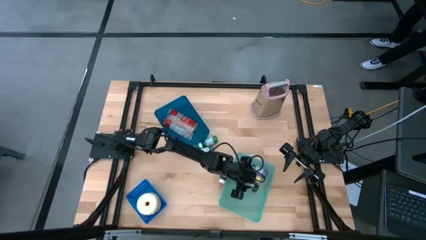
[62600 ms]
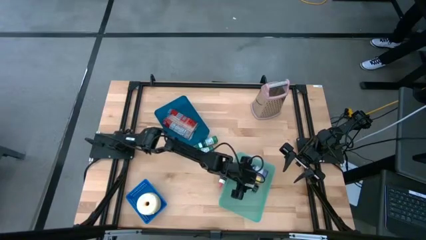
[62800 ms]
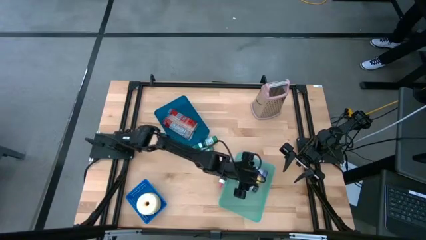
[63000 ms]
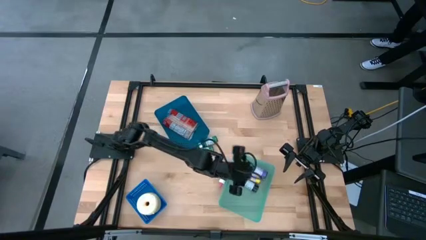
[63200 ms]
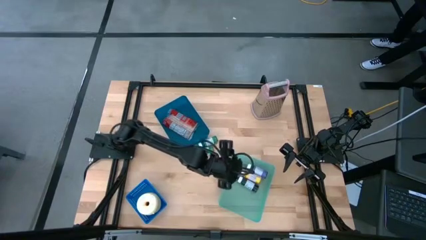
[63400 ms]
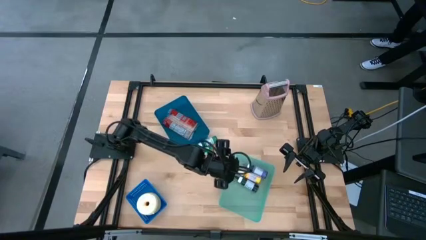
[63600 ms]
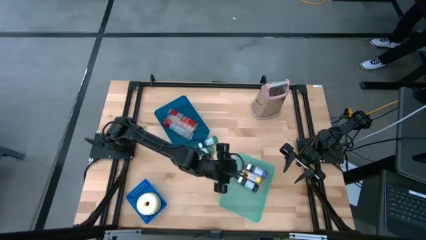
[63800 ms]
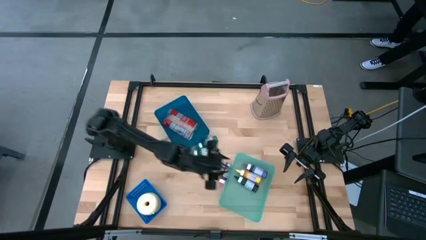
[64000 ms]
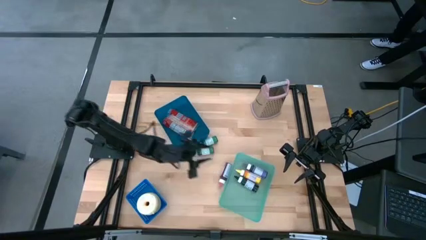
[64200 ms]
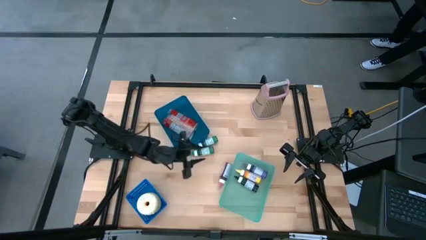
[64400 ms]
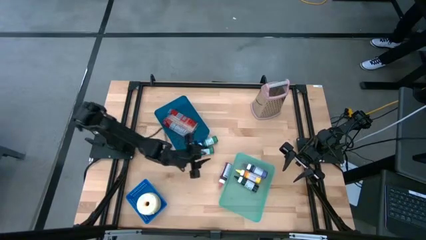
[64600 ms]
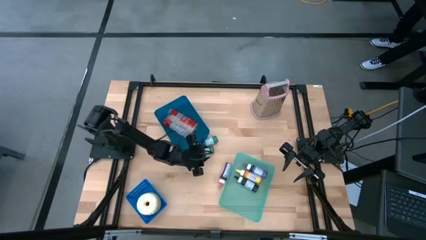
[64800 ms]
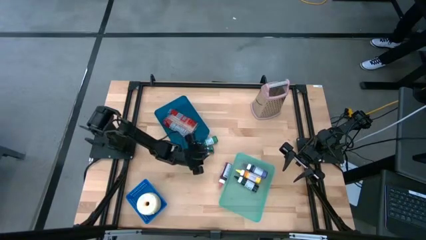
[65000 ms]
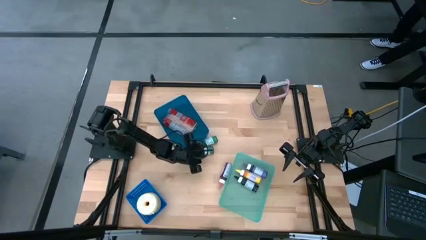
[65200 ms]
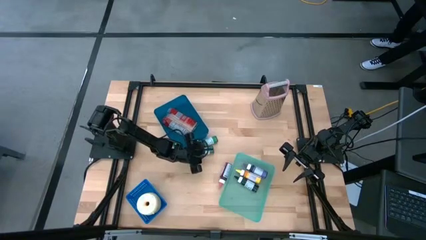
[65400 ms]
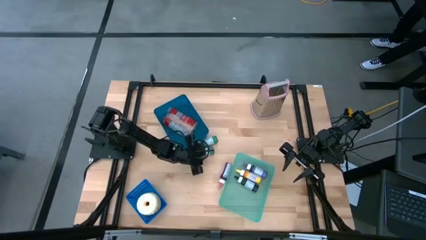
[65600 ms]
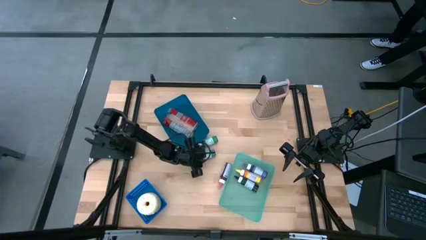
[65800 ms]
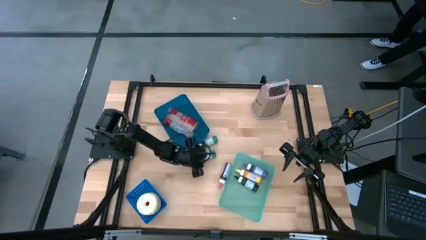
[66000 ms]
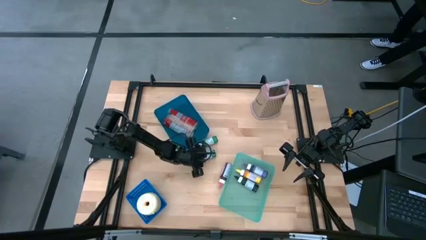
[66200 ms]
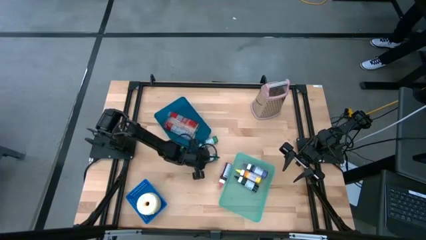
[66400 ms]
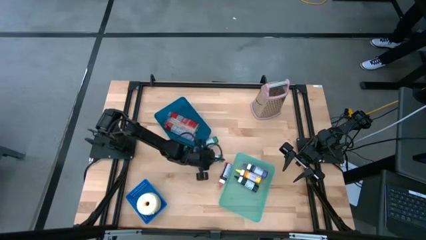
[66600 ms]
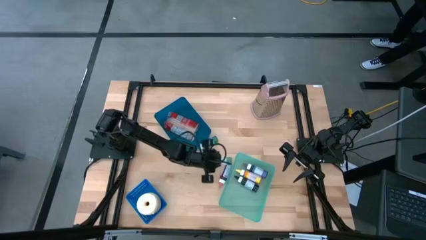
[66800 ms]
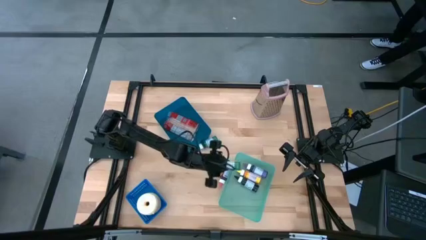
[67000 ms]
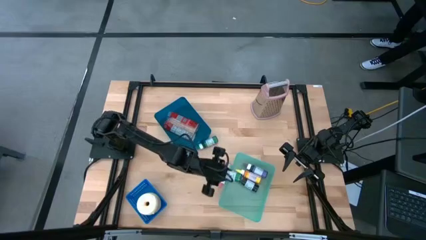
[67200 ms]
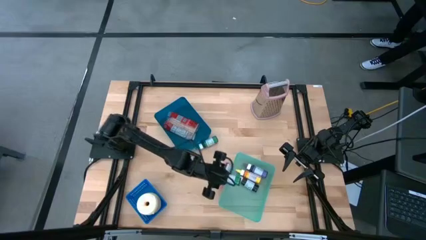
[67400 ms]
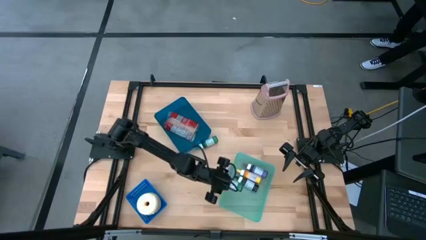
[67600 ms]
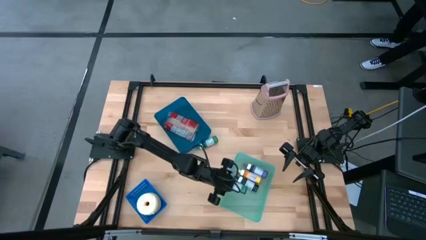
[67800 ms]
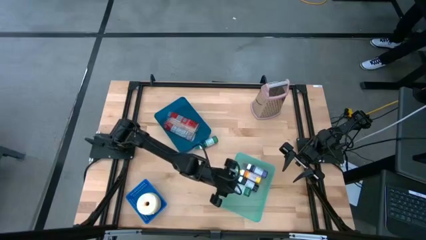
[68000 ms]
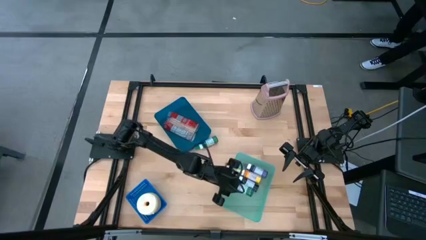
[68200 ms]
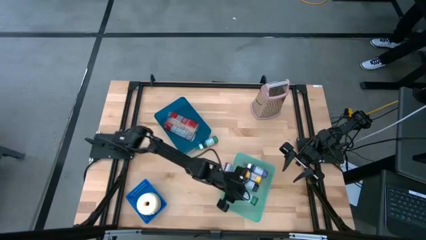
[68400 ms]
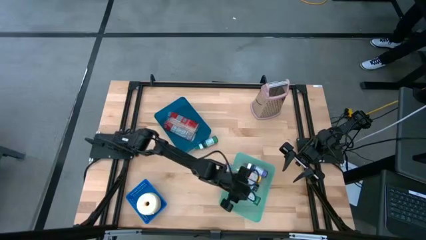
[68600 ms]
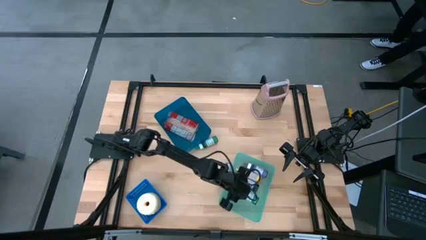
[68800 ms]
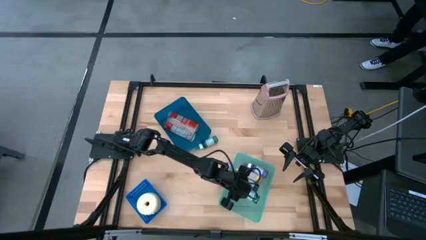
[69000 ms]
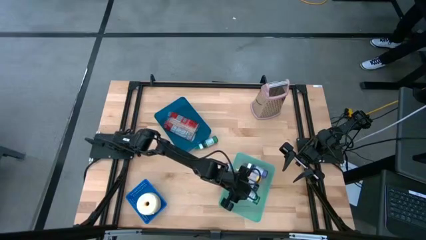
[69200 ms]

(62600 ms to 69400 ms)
Put the bottom green food coloring bottle into the green bin

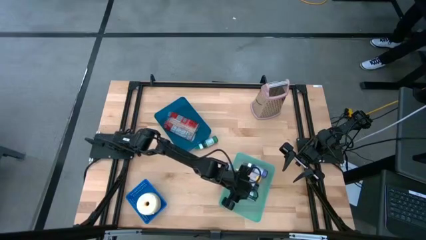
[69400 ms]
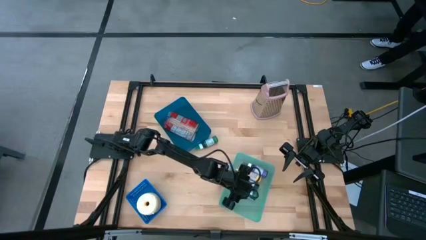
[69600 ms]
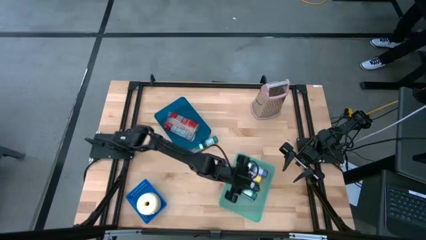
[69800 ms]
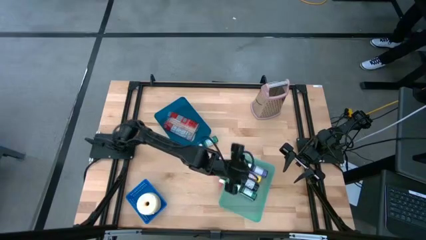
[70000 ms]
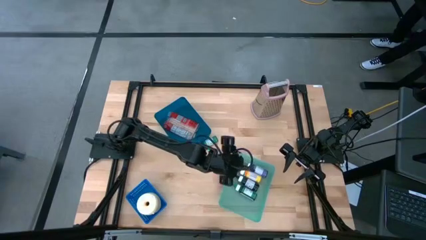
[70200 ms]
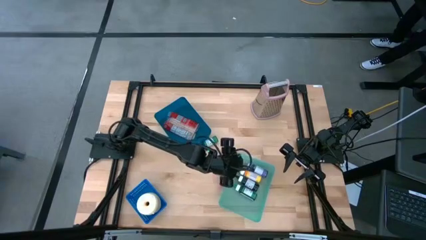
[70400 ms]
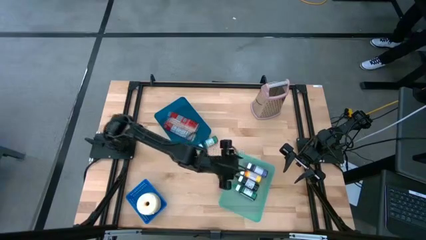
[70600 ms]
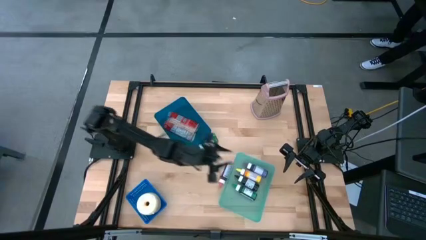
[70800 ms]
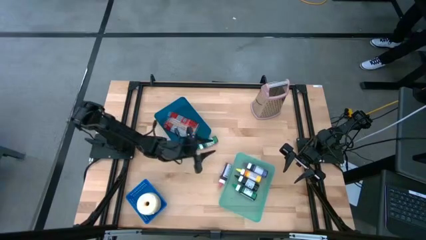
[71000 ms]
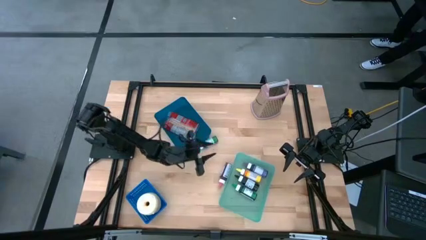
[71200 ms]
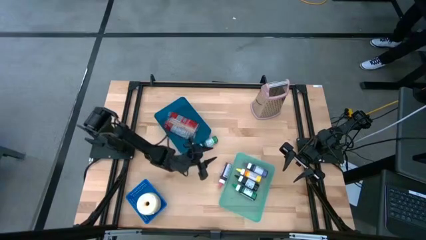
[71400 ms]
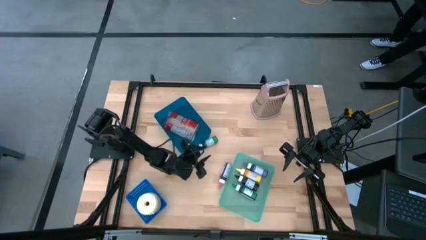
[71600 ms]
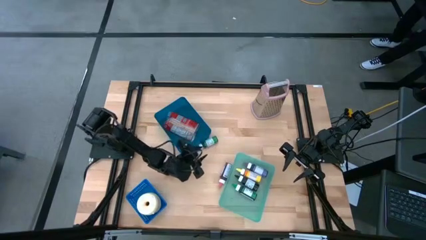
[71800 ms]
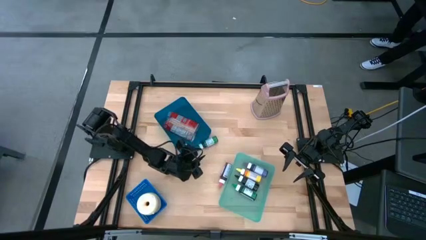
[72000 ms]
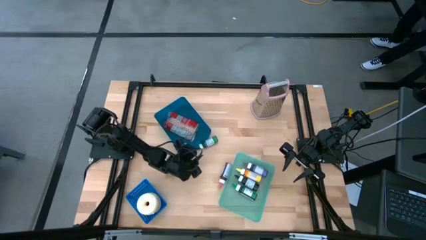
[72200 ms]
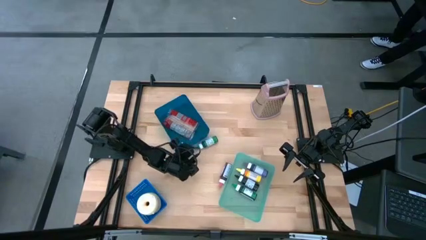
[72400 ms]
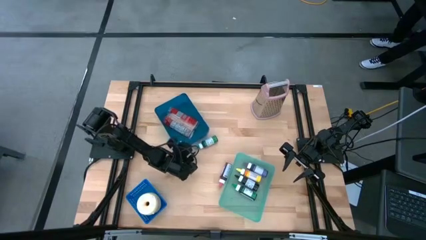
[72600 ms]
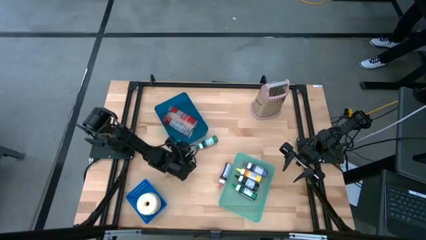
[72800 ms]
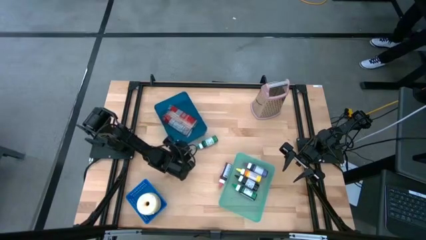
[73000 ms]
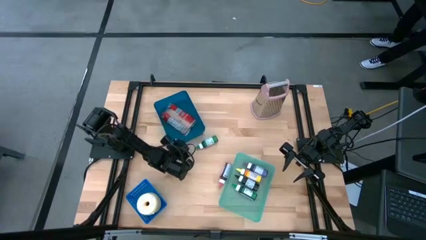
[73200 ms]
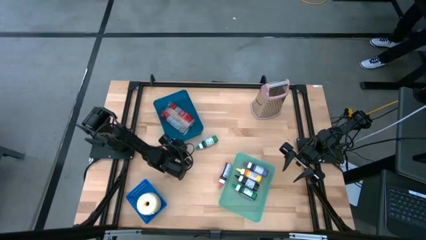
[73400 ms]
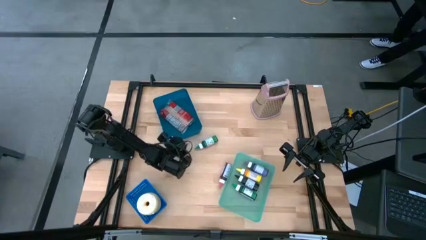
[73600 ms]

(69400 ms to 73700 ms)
Move the blue bin slightly upward on the table

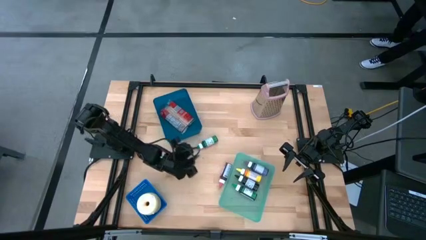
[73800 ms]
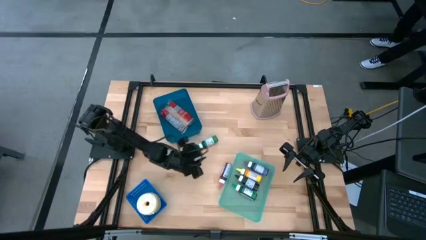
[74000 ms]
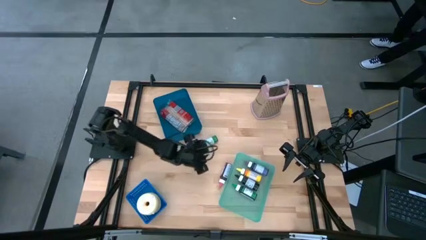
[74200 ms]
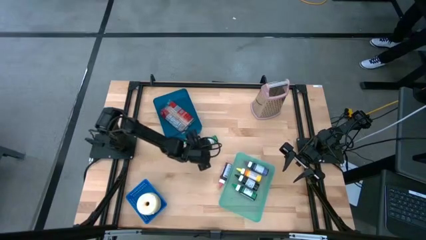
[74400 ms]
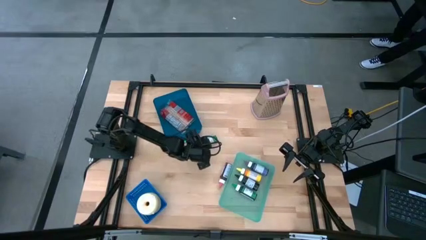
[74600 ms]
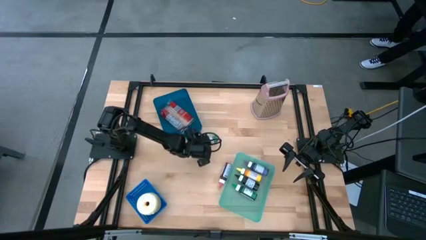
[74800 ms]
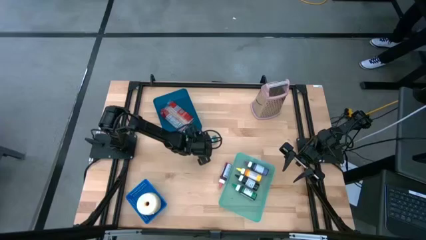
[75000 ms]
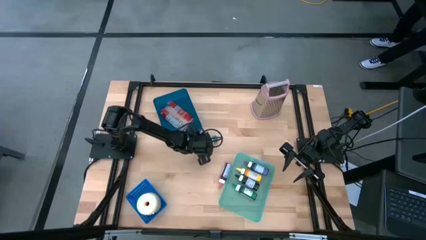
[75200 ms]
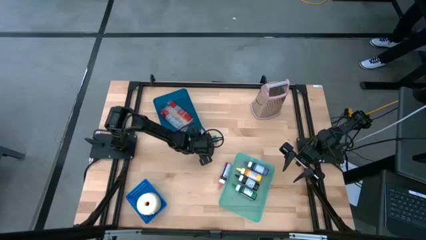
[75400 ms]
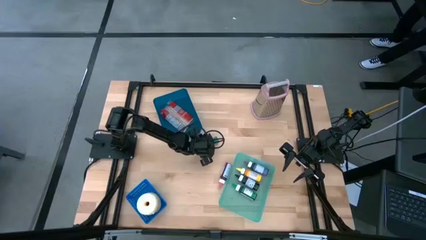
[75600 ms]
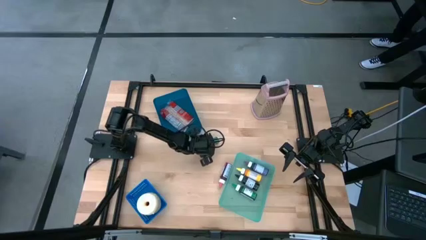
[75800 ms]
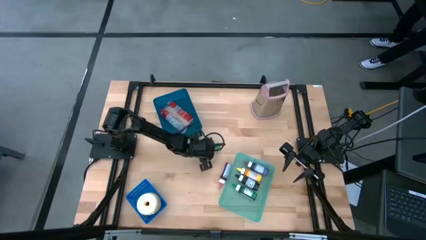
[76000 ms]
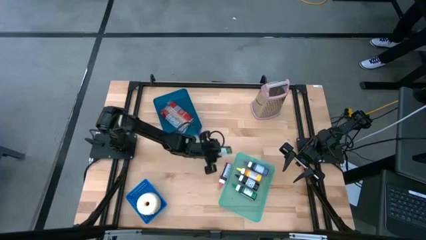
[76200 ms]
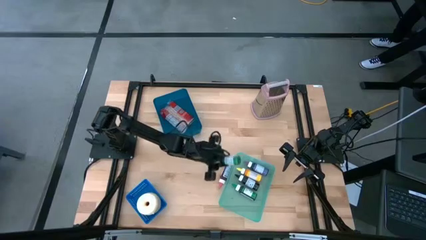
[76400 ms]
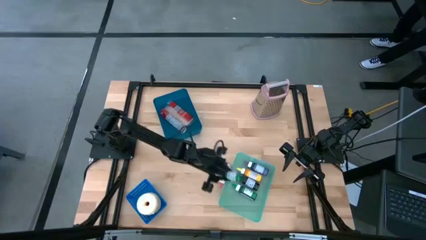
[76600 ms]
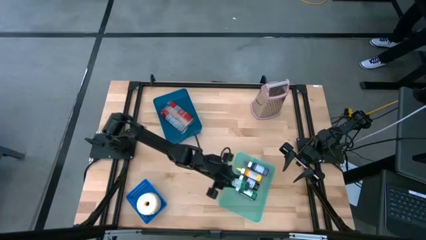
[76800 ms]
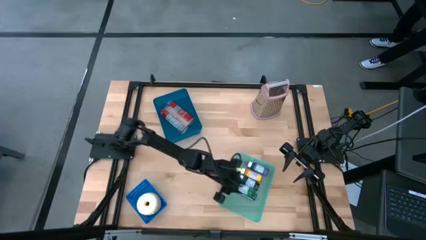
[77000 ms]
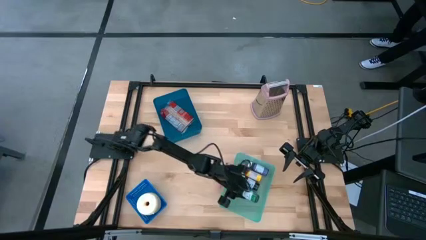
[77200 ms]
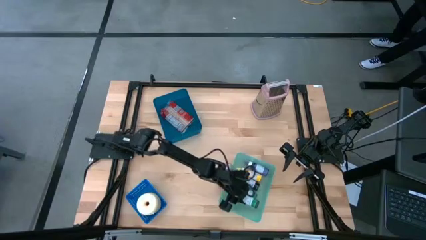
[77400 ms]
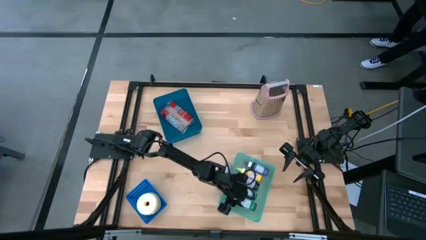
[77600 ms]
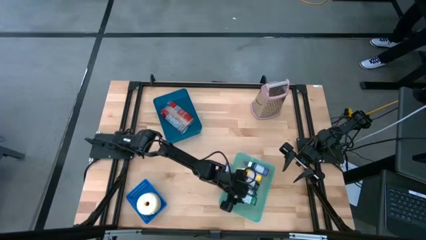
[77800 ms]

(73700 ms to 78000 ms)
Put the green food coloring bottle into the green bin

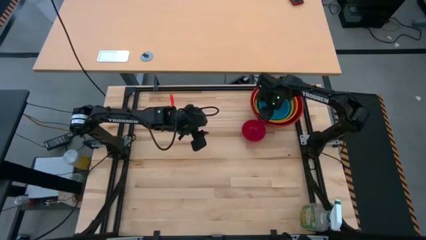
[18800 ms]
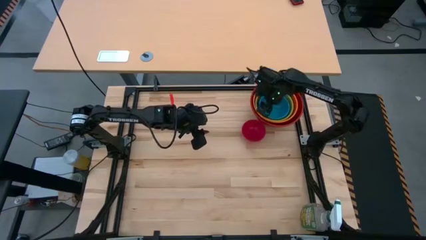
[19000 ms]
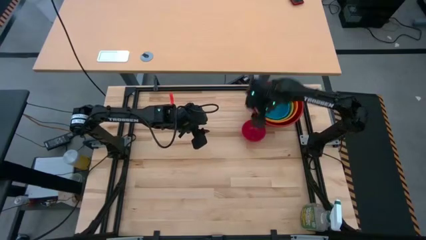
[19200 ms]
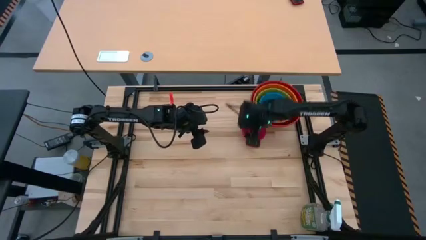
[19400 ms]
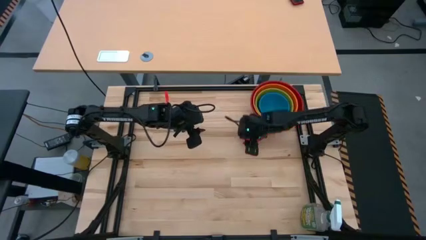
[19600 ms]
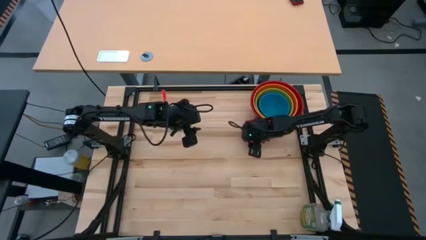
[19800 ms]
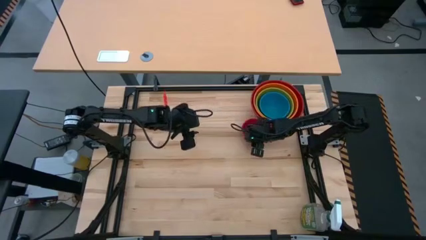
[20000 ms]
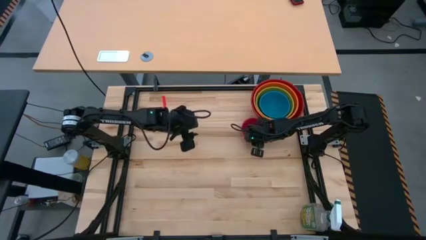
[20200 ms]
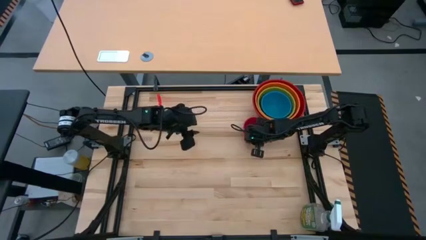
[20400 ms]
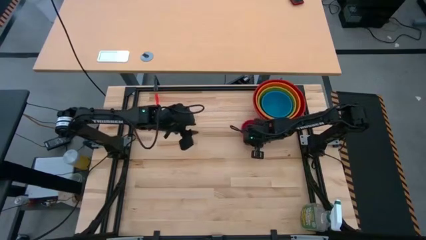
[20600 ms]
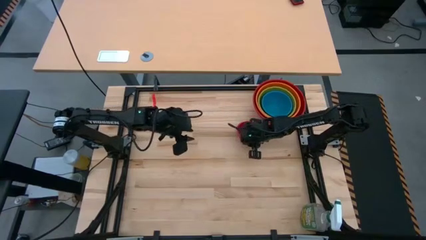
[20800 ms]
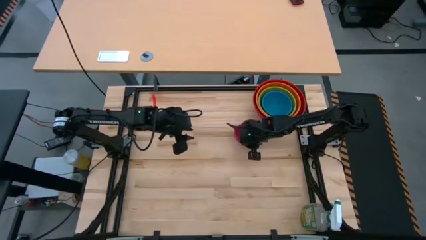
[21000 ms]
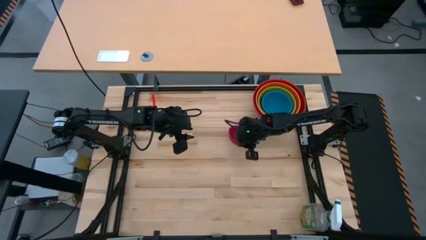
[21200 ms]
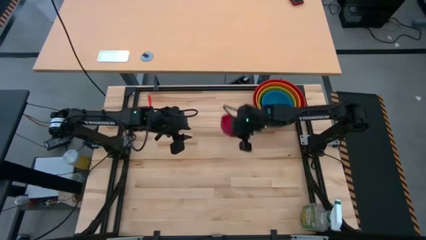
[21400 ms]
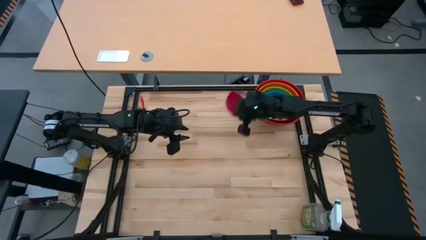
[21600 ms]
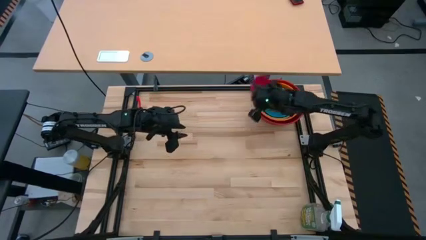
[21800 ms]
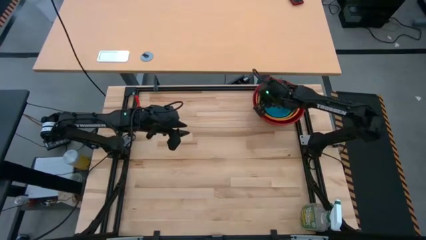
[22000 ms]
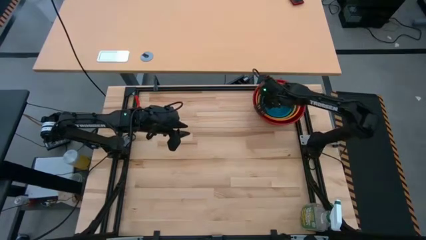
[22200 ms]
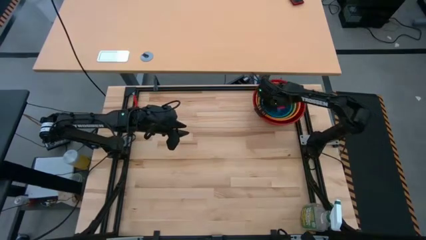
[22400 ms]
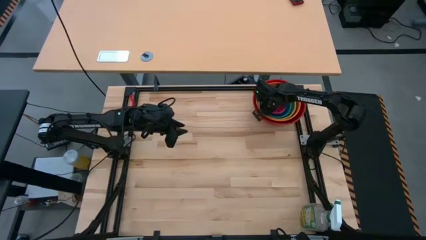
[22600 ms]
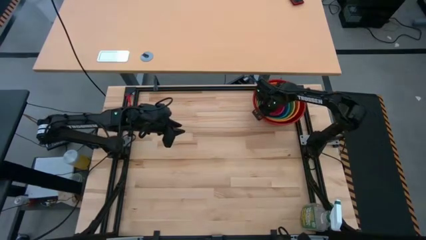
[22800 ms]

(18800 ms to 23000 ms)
Stack the pink bowl into the blue bowl
